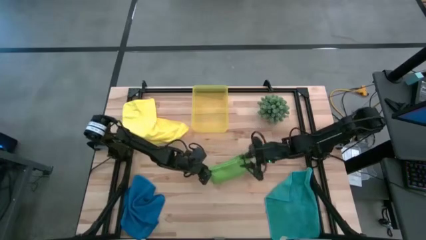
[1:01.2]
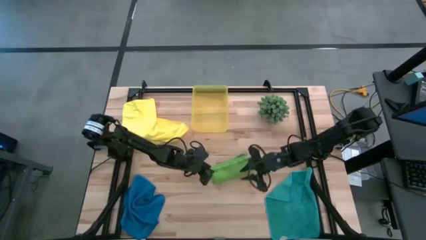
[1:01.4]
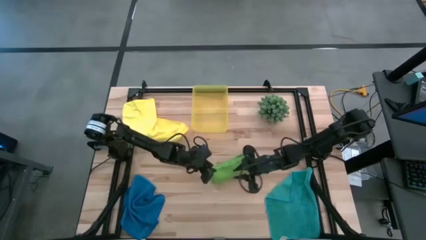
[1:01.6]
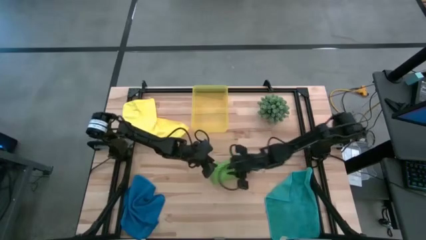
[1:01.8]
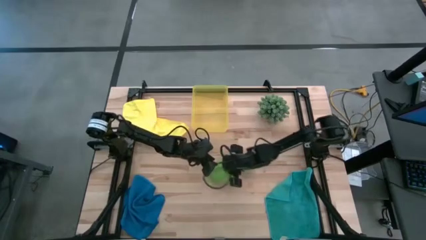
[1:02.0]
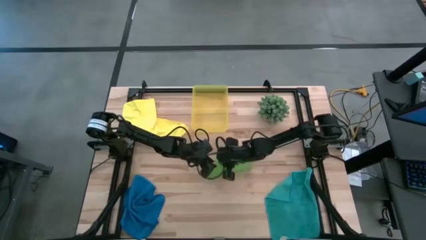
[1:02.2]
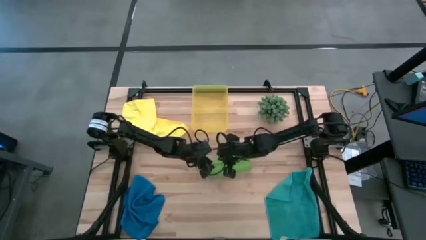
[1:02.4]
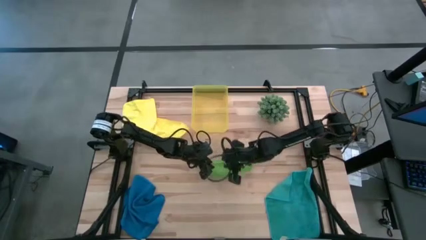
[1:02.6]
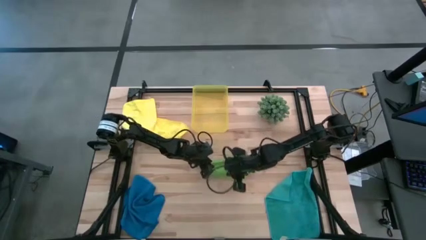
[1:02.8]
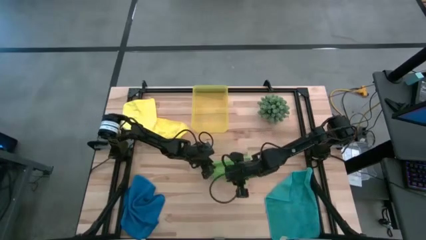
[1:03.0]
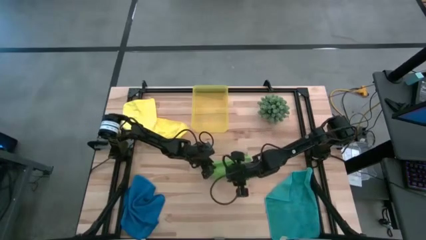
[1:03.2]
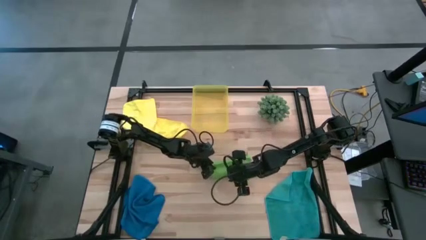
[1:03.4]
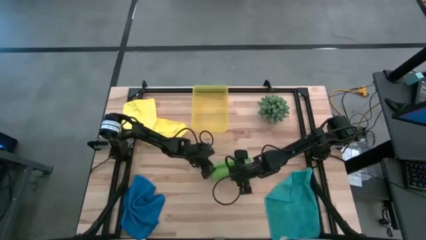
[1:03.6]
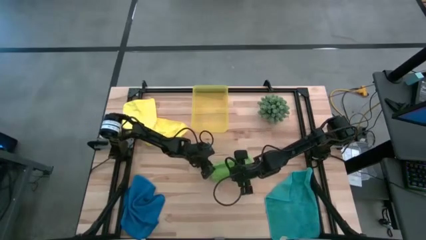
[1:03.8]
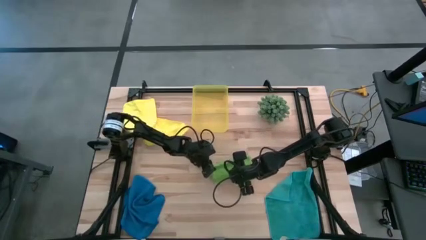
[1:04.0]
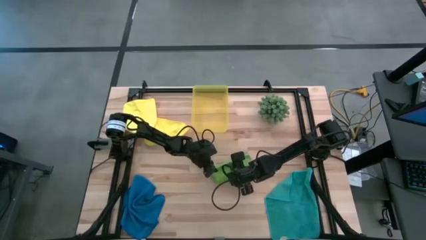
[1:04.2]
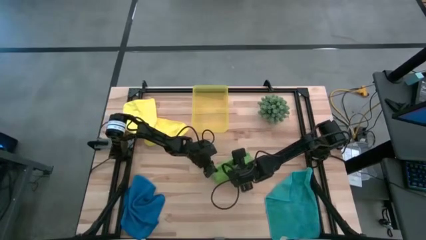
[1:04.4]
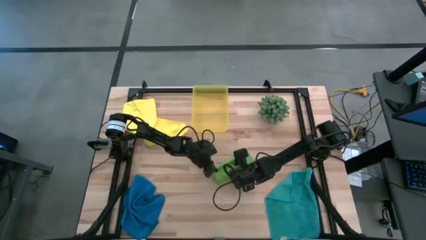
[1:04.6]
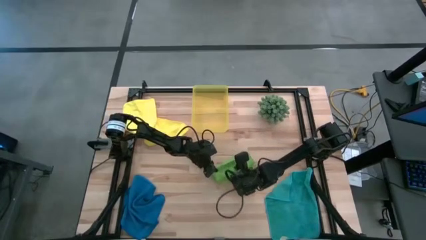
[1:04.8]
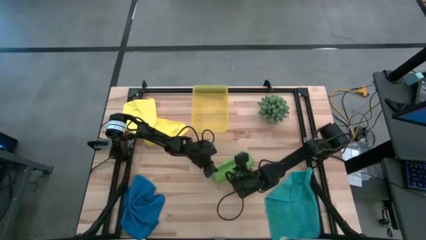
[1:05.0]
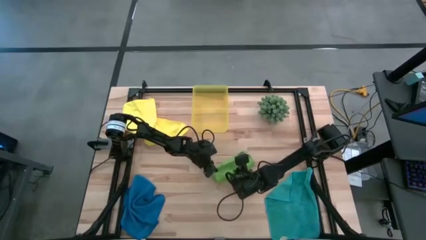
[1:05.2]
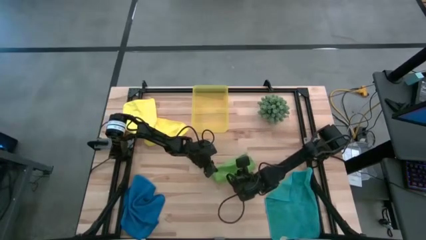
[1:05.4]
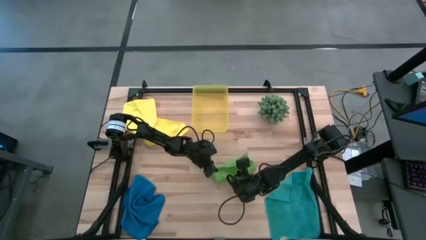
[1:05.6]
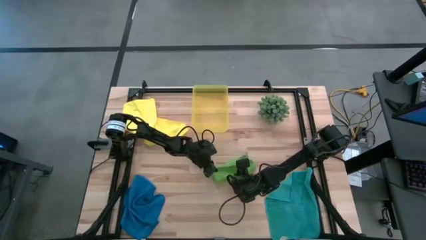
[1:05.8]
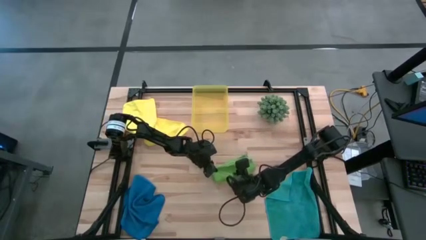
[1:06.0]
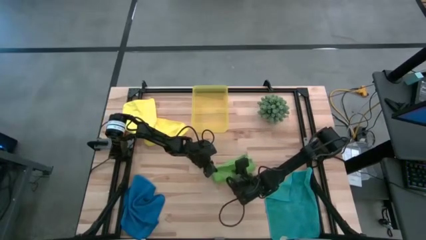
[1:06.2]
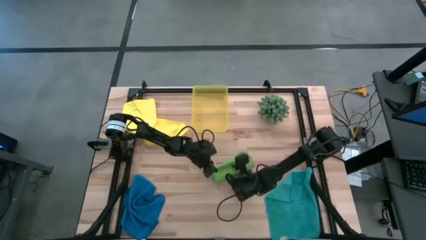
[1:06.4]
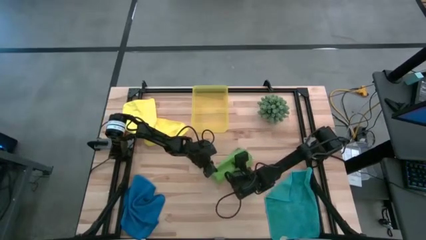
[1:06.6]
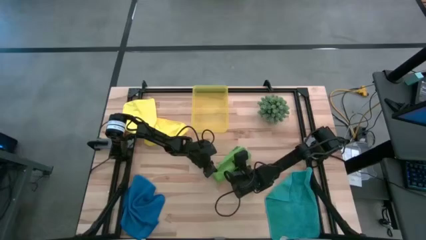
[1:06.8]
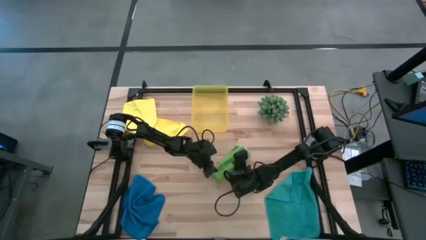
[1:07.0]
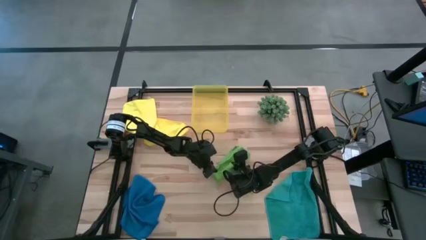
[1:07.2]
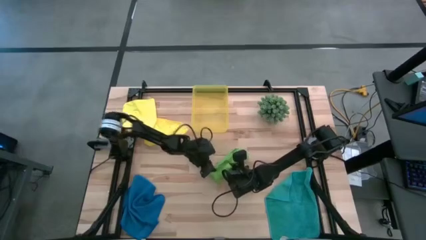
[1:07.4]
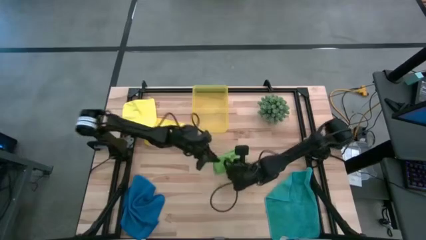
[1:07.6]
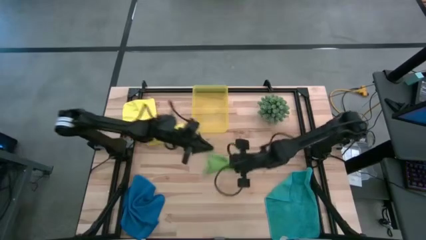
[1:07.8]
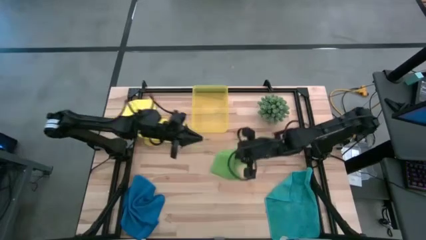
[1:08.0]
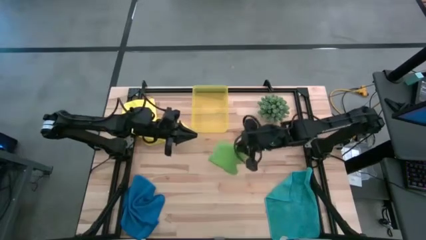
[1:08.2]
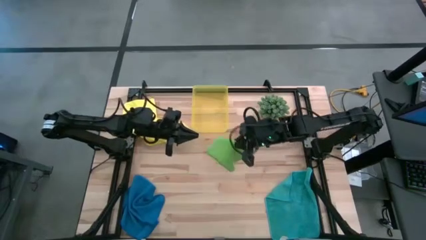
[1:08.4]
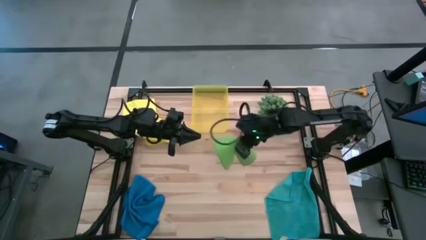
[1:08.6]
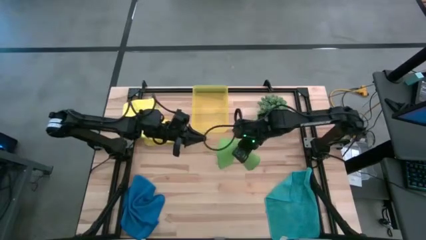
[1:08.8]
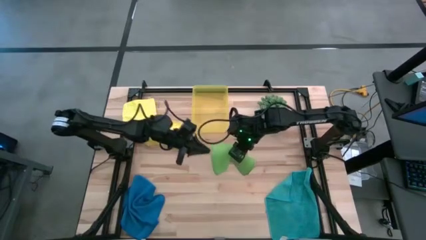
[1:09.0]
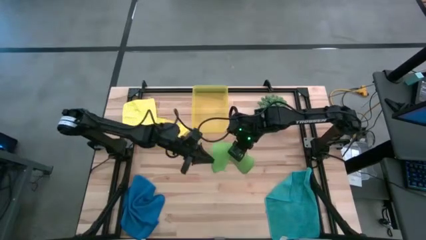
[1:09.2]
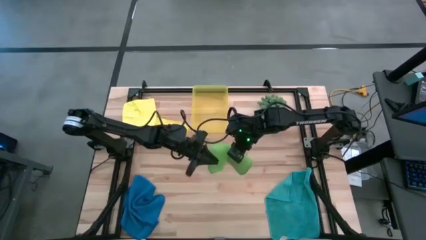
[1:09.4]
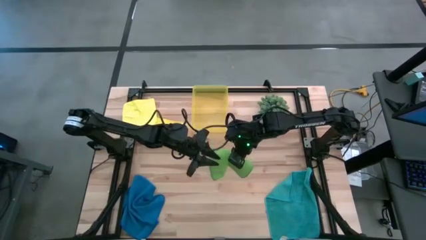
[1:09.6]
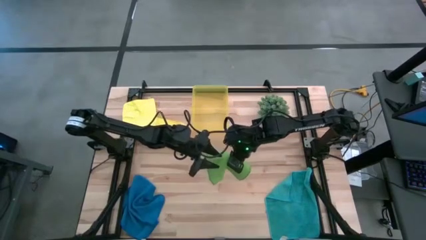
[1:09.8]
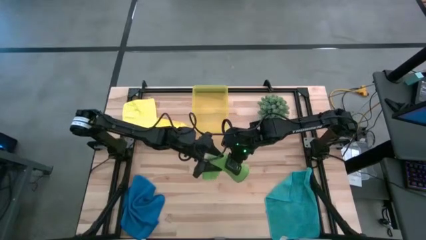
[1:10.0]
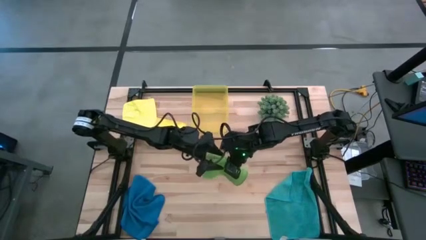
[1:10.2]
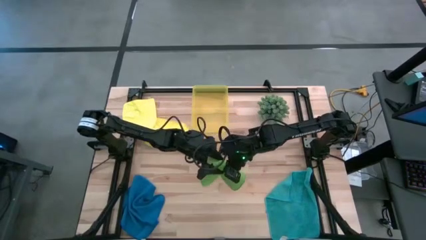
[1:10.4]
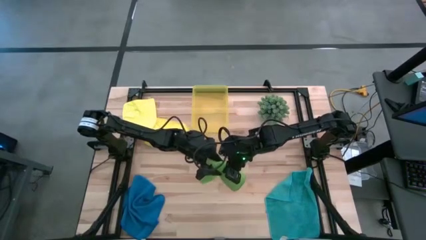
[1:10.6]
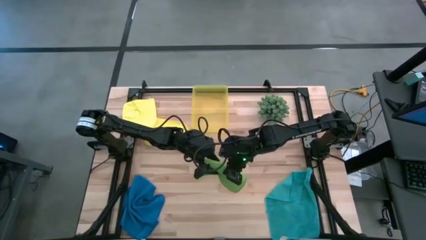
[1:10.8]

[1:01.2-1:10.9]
Task: Fold microfiber towels
Put the green microfiber cloth into the yellow bin

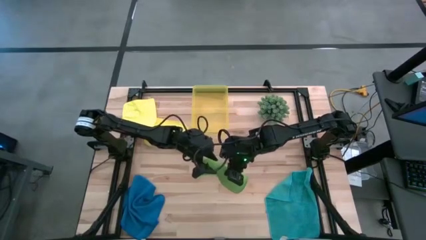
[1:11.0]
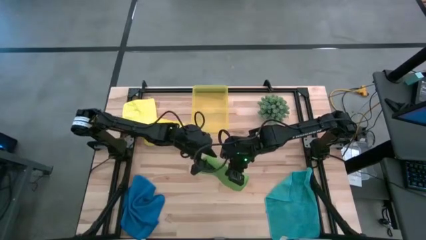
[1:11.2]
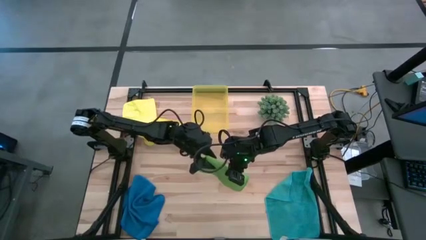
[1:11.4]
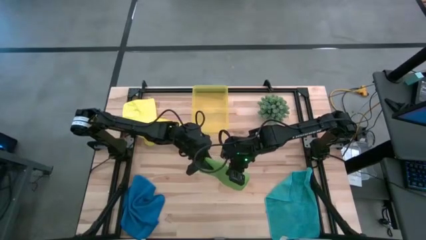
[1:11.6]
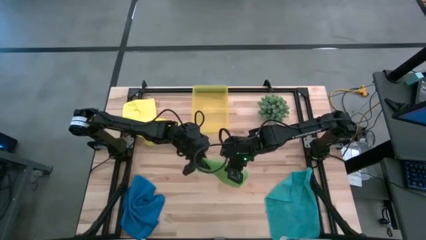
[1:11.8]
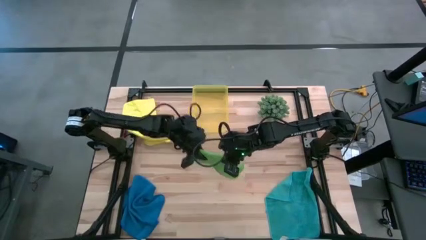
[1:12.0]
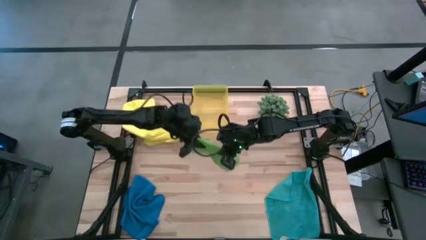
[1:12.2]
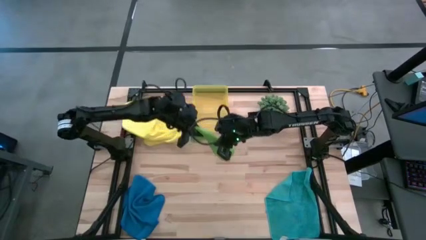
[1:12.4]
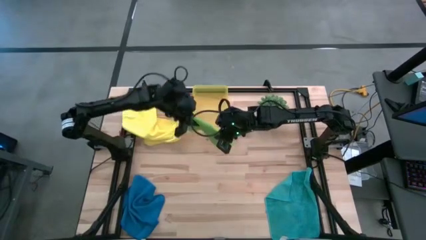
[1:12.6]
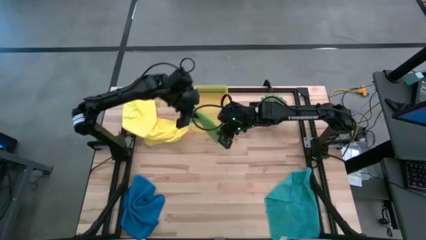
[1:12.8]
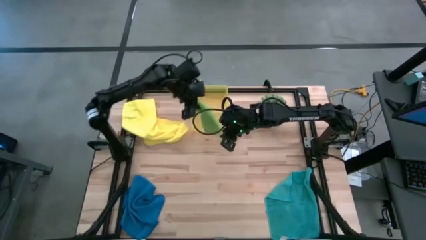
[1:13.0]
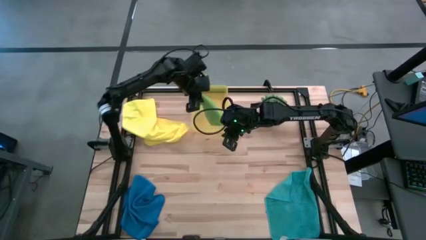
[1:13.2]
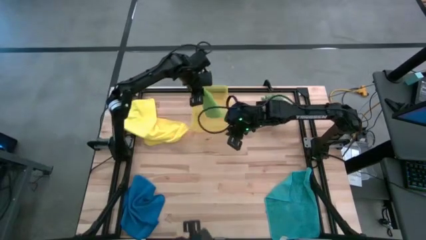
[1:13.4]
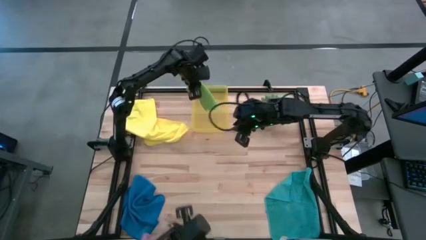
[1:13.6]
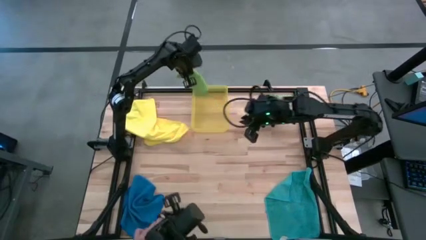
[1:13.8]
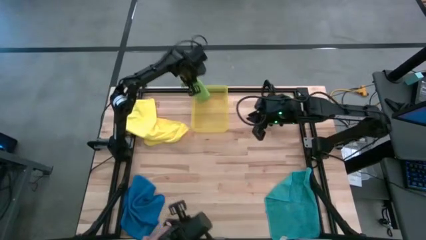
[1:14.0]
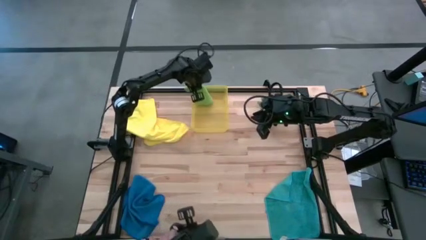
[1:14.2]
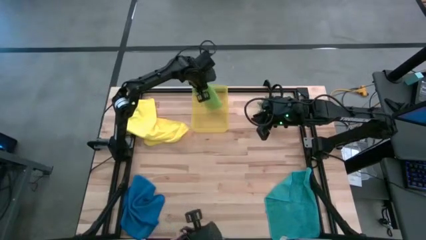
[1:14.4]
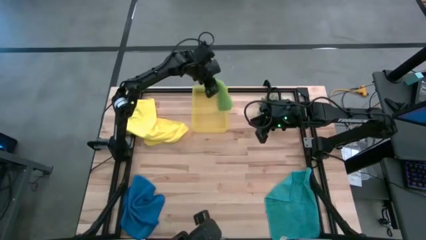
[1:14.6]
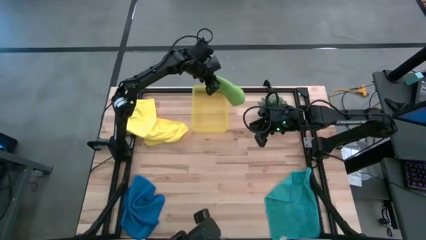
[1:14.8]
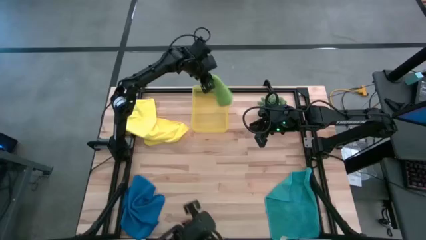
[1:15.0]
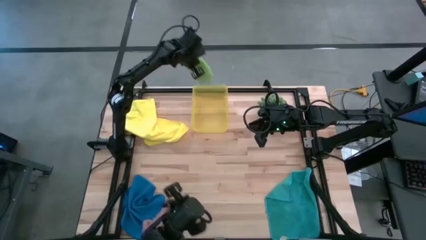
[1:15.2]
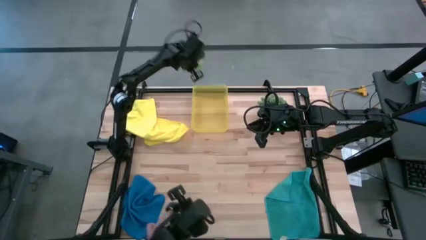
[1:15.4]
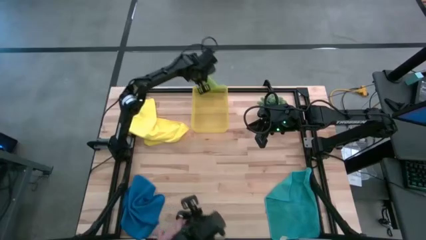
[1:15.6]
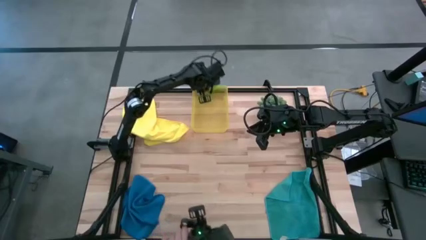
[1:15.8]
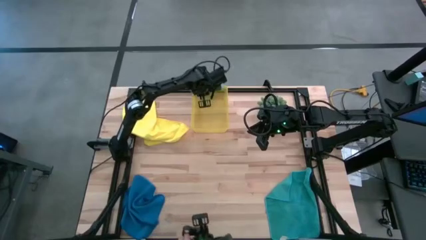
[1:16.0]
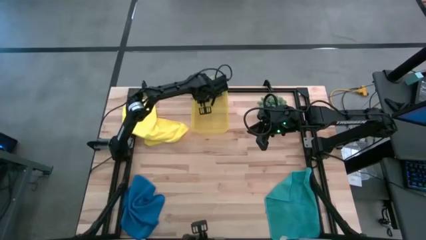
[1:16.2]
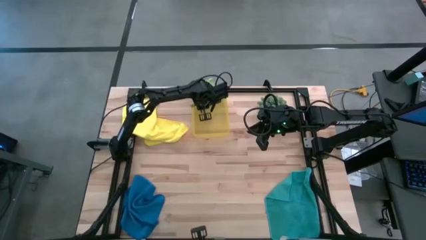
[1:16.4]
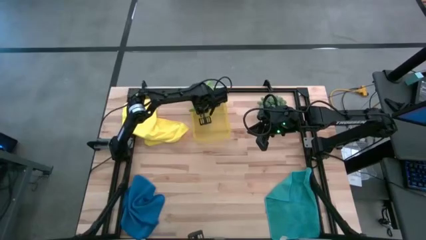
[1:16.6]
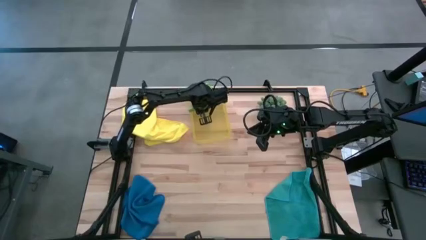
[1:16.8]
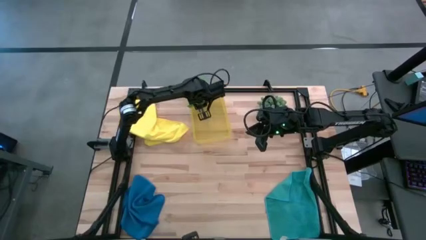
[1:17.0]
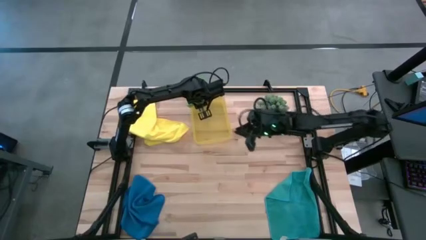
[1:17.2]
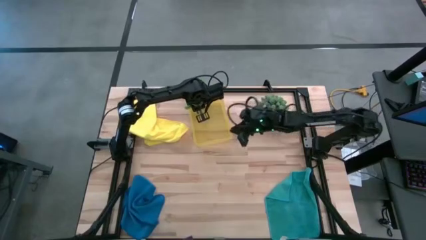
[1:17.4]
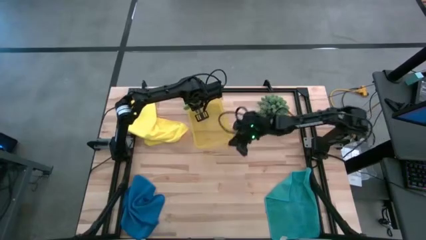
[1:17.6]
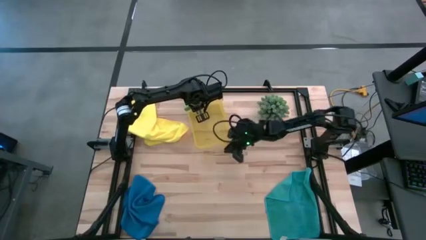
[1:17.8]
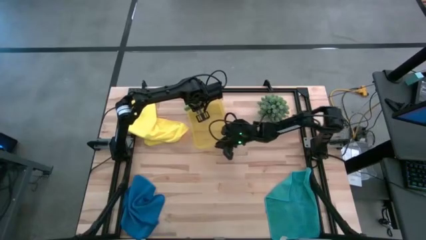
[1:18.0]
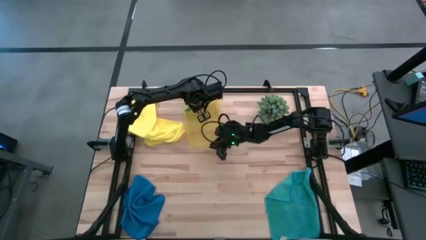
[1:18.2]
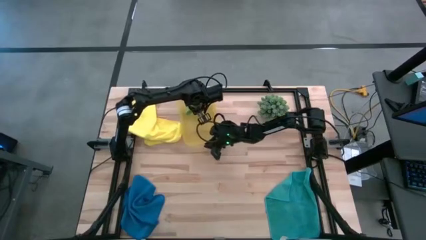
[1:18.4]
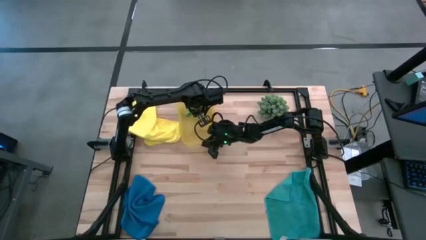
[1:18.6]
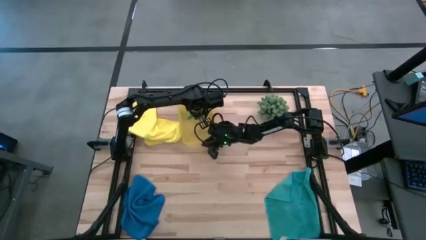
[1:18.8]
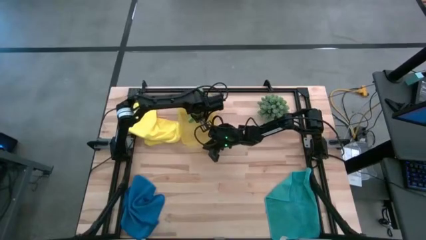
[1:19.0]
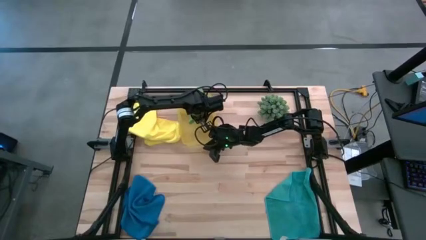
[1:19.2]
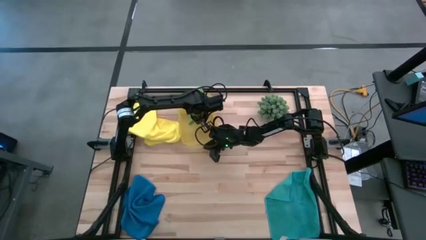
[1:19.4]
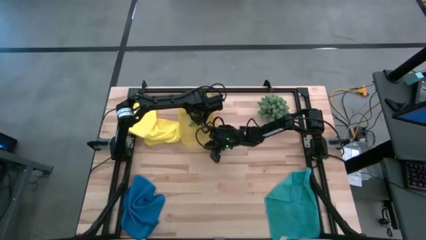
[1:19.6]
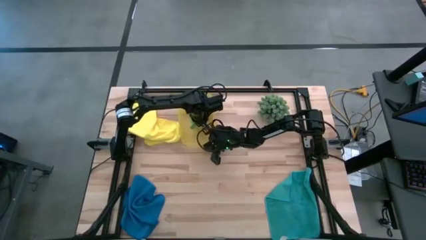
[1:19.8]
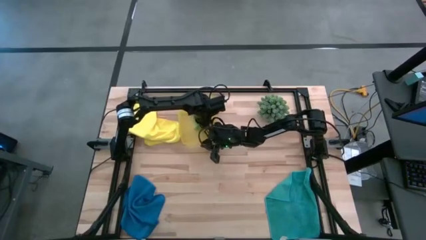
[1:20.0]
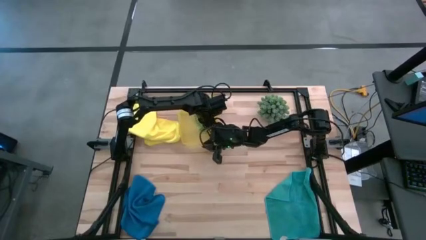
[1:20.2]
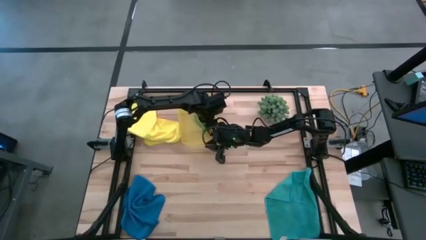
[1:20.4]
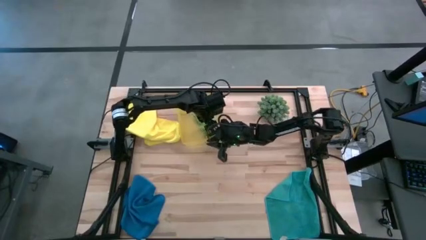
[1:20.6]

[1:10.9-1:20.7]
Put the green microfiber cloth into the yellow bin
